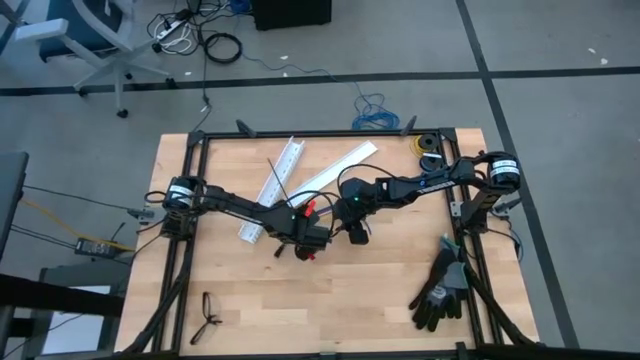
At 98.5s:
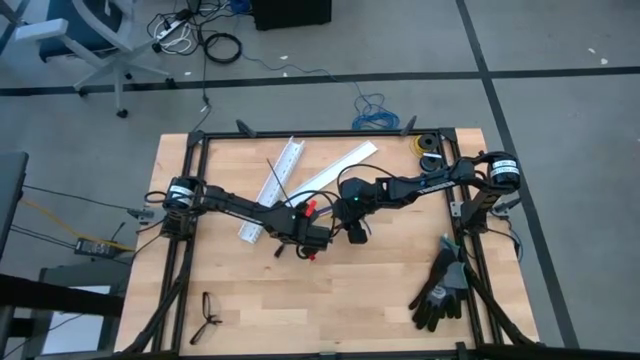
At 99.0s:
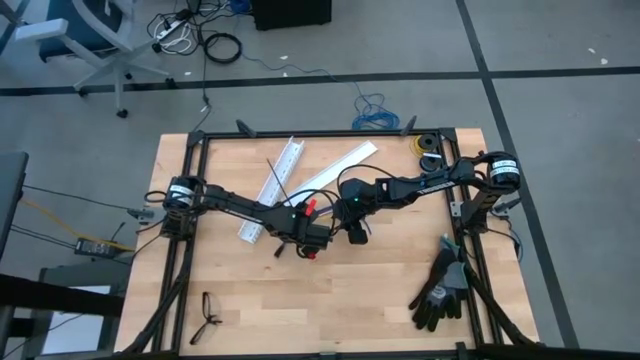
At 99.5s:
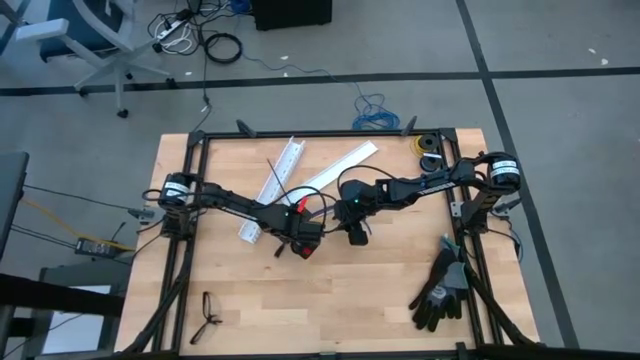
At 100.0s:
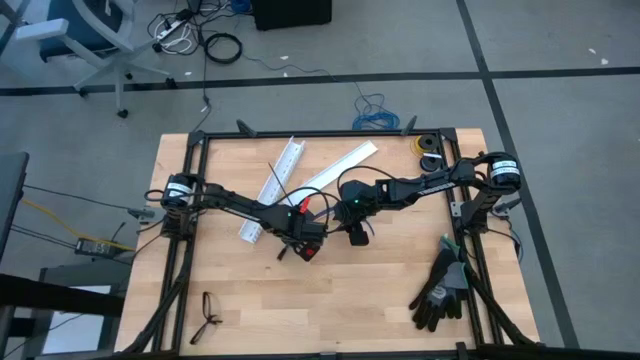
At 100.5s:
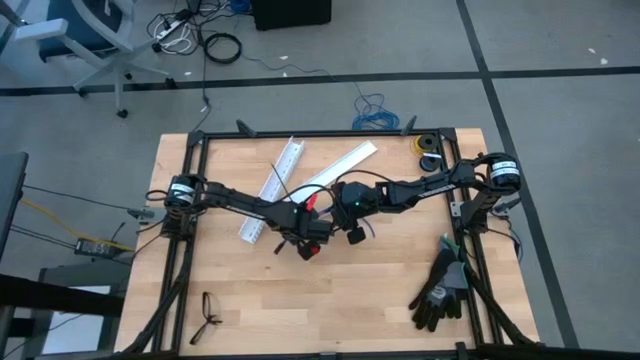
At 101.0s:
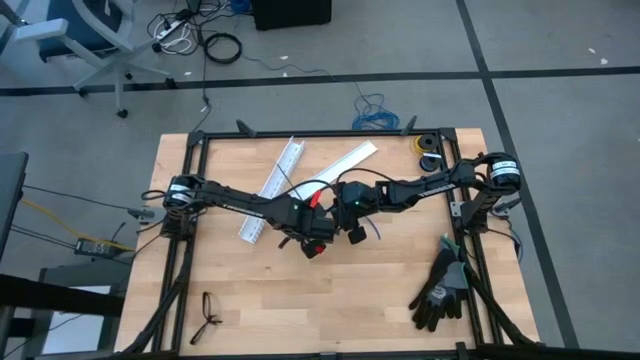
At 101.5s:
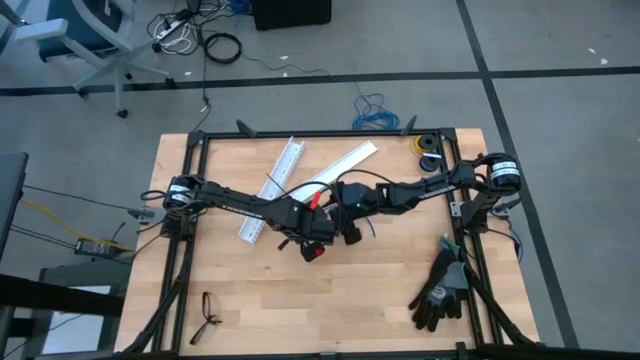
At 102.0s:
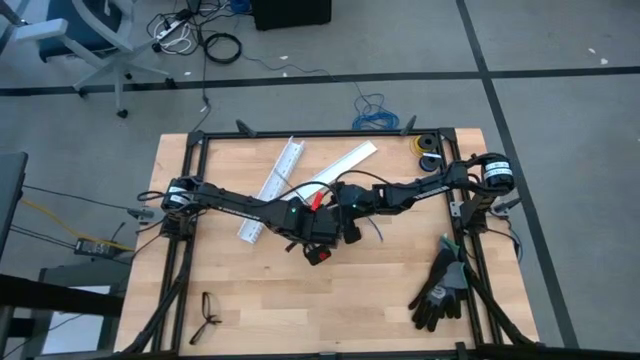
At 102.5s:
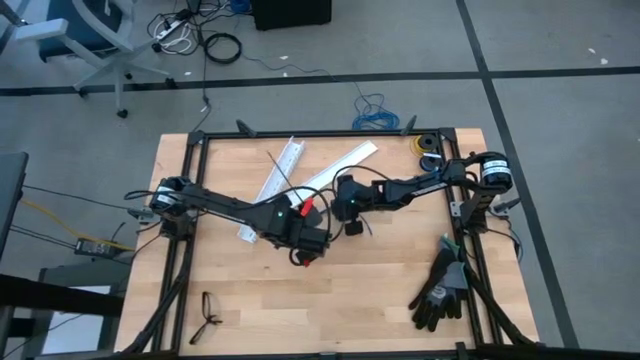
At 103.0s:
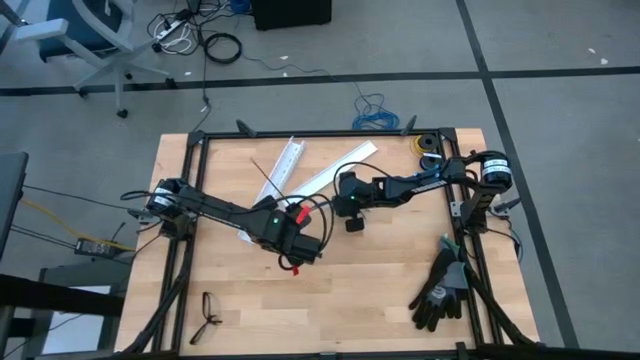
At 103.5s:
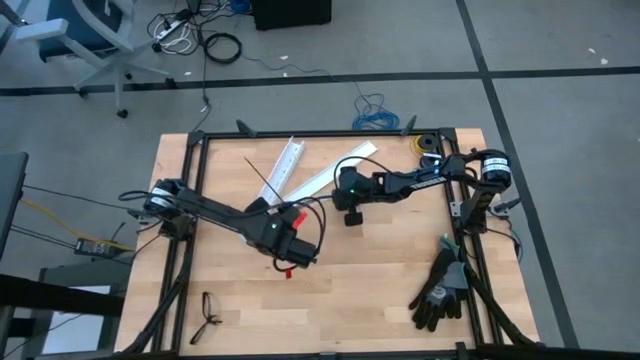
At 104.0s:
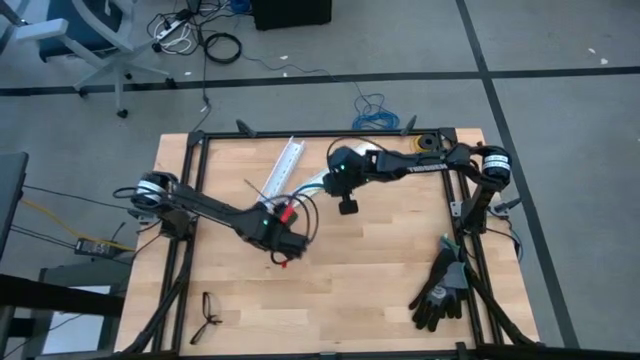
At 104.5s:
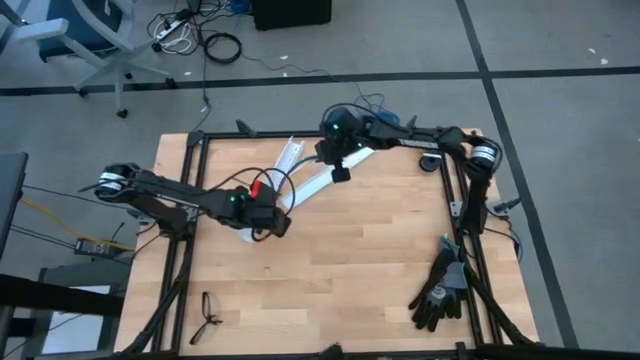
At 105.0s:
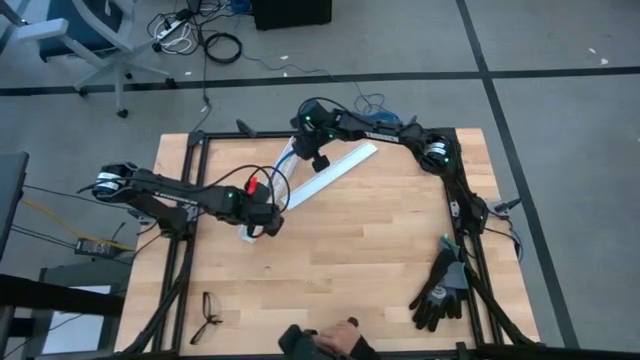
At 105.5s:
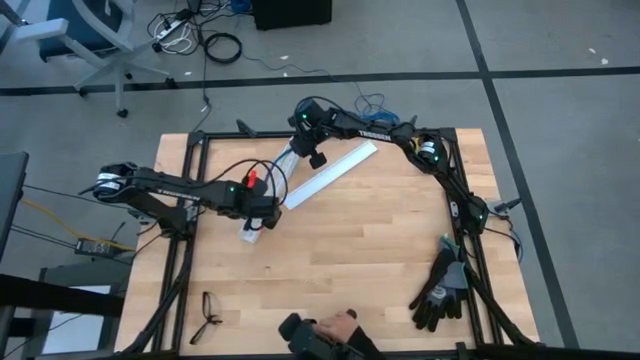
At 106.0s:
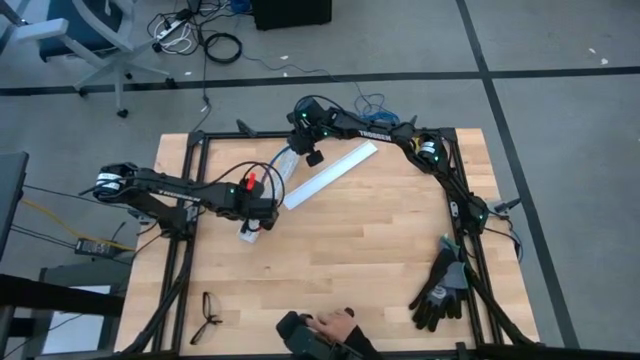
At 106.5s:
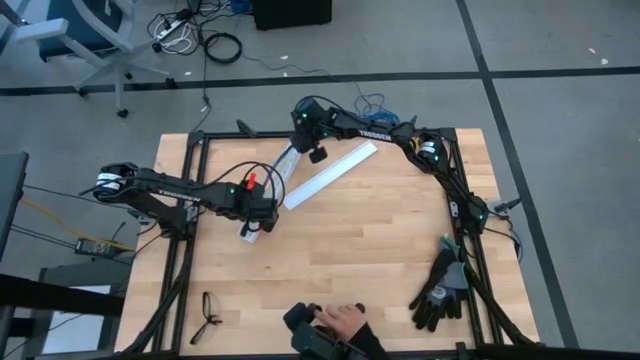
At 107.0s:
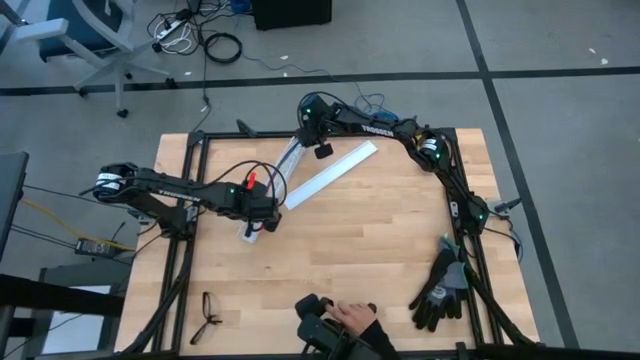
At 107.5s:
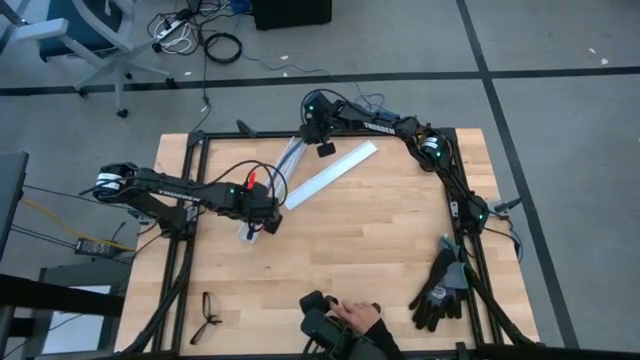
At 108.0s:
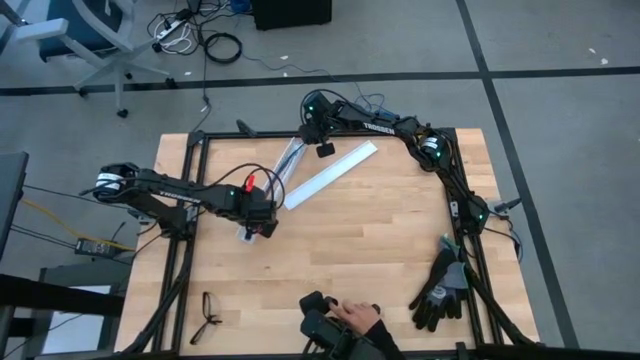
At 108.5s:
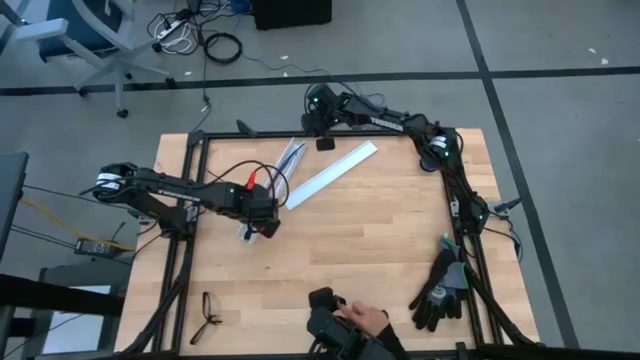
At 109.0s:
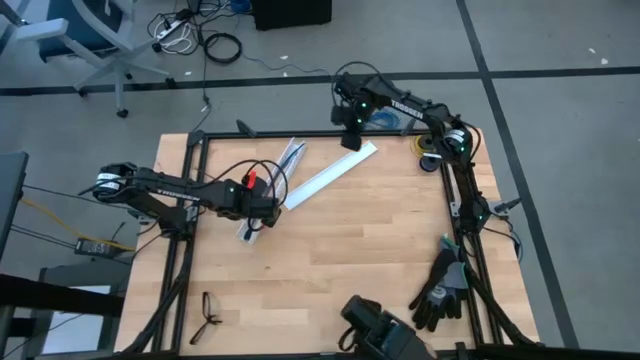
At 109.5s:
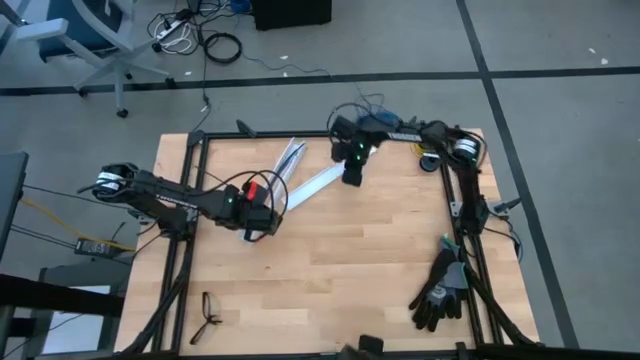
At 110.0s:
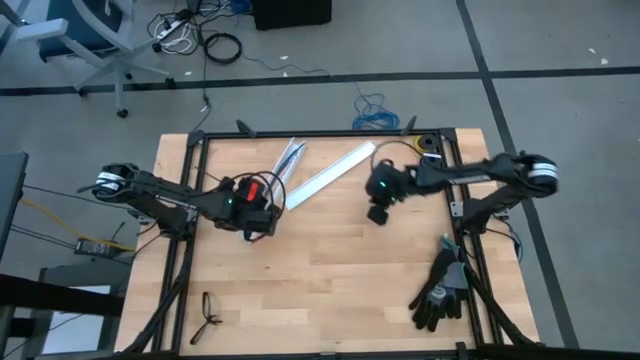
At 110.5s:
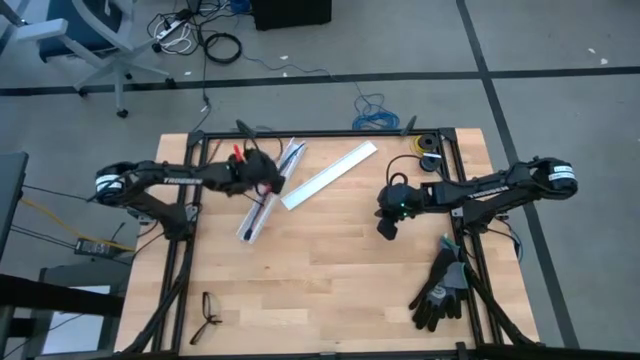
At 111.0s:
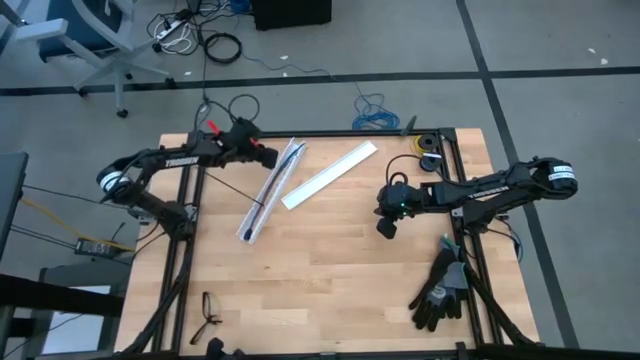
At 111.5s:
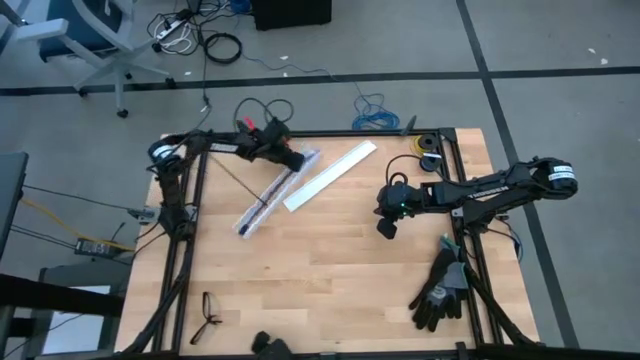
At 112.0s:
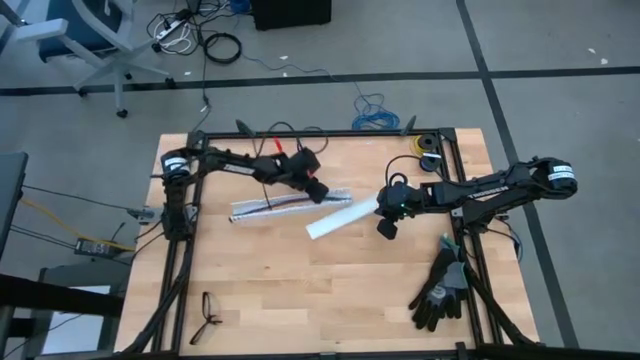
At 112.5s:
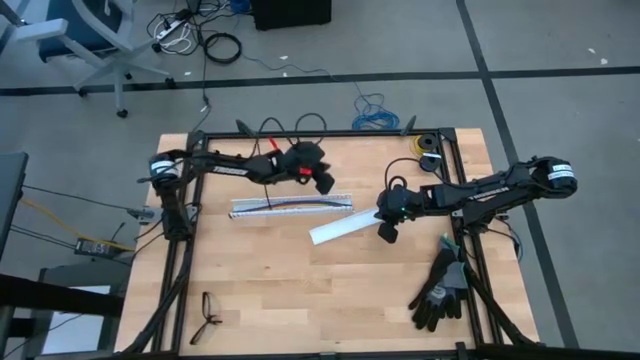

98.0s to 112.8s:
Task: Ziptie cables
Put the ziptied cable wires into the white cable duct

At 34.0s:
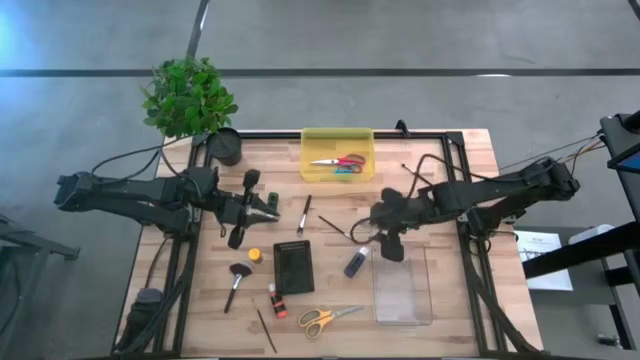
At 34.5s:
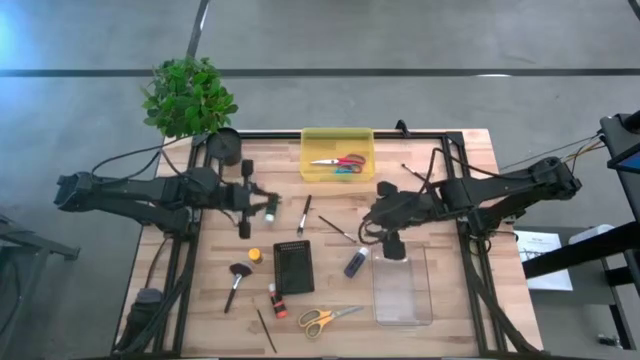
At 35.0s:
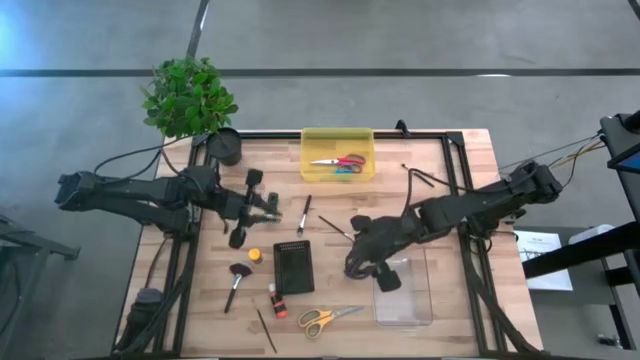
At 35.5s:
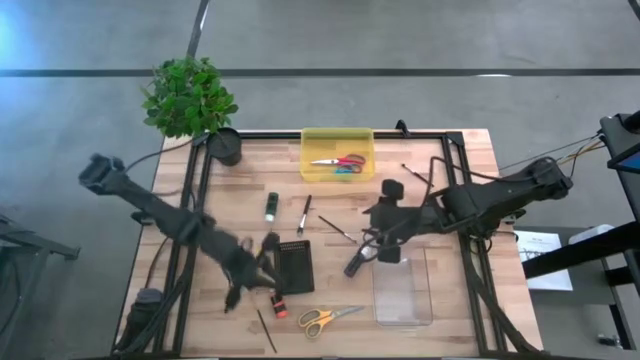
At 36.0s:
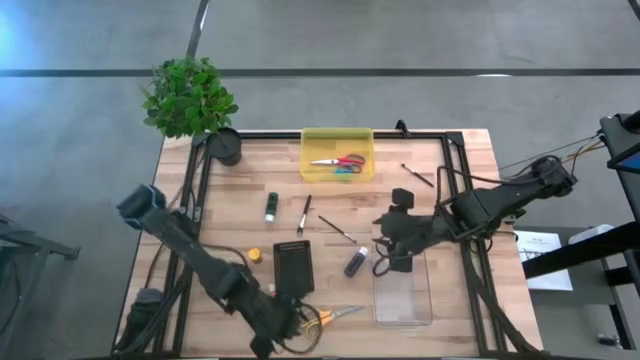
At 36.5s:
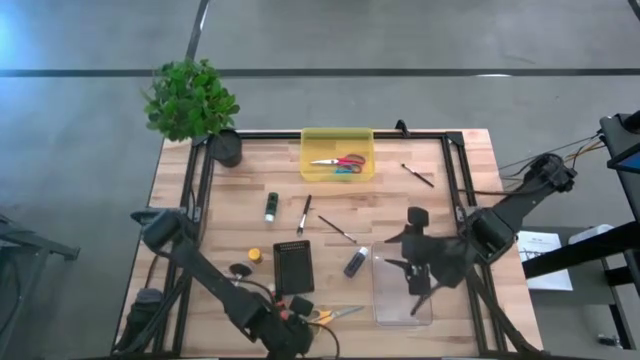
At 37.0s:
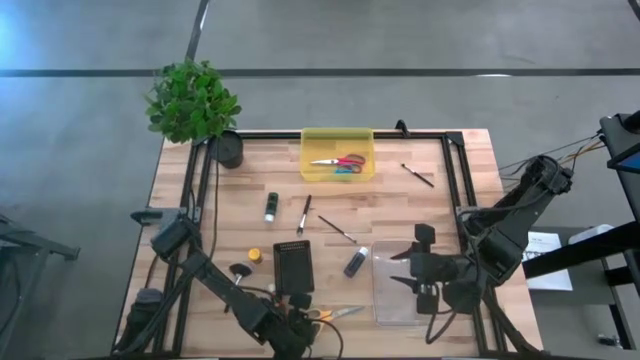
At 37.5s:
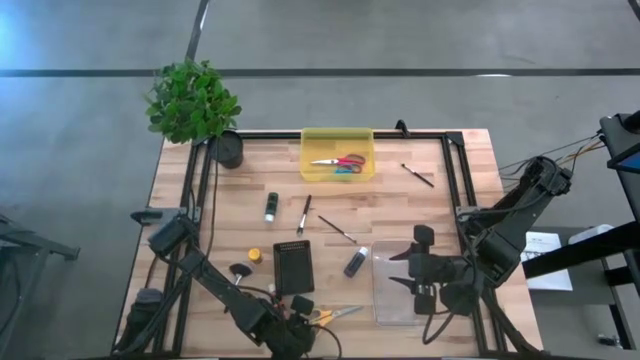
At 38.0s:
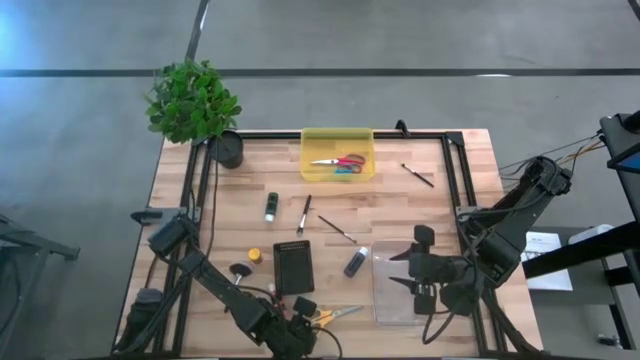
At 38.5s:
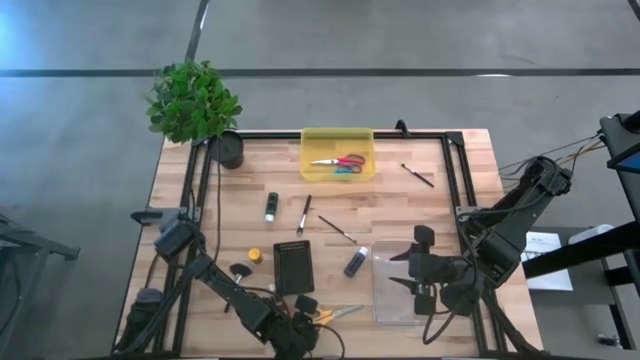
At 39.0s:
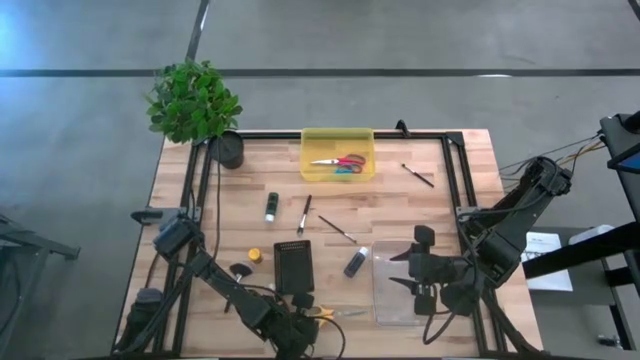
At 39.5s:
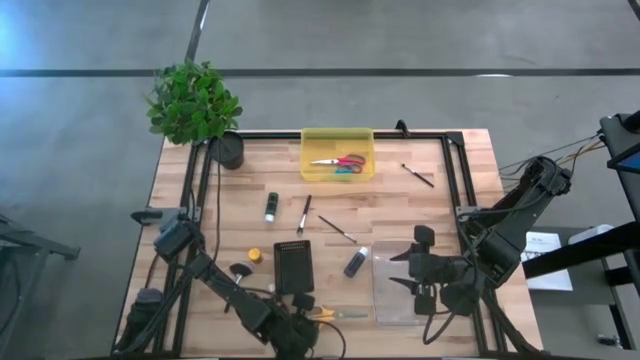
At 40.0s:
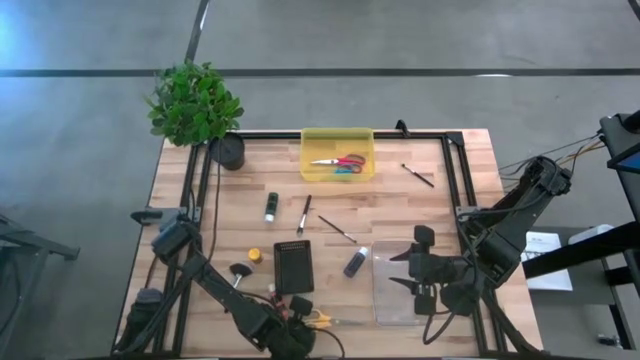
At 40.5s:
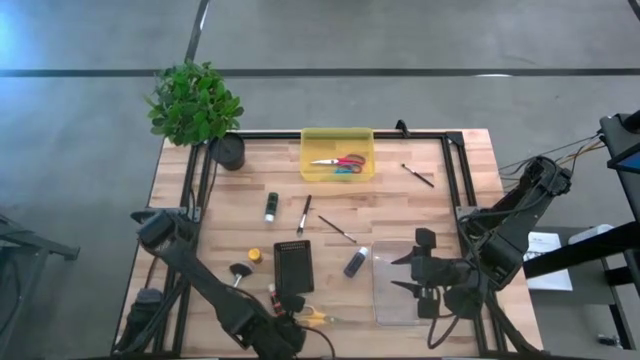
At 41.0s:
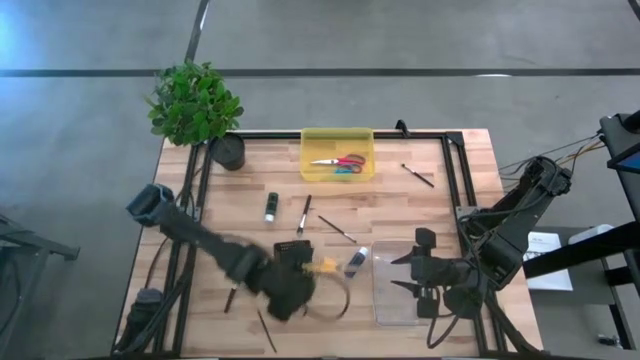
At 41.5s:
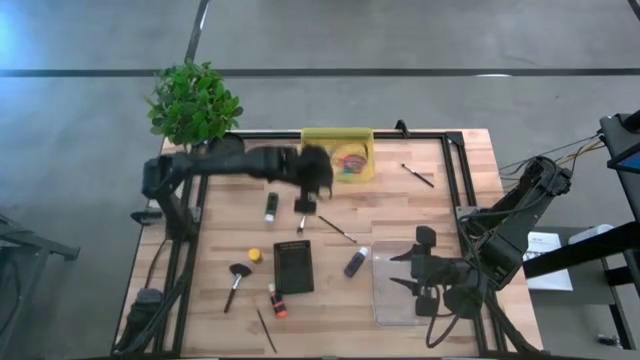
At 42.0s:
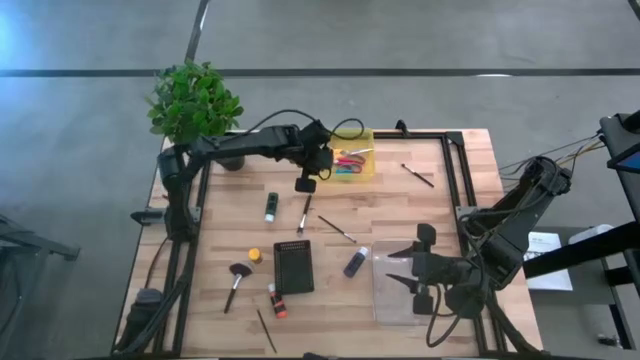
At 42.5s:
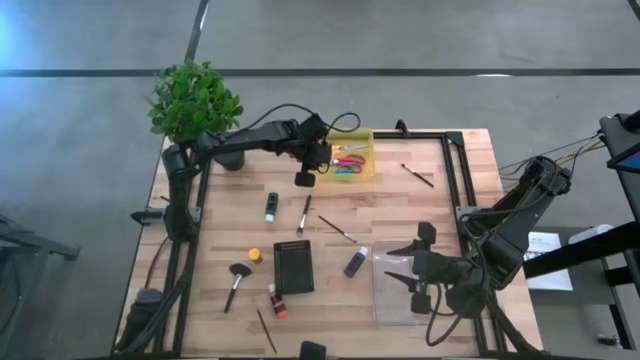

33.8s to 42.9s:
Task: Pick & Place Paint Supplies
Put the yellow scissors into the yellow bin
